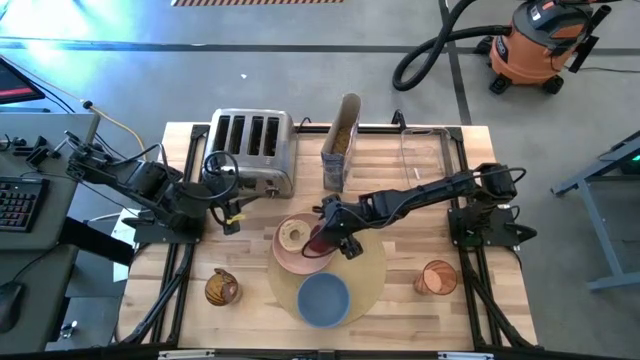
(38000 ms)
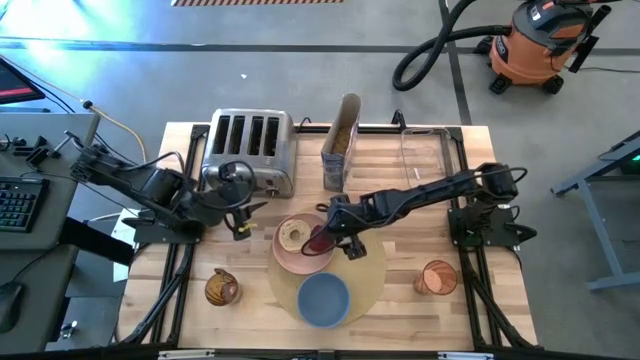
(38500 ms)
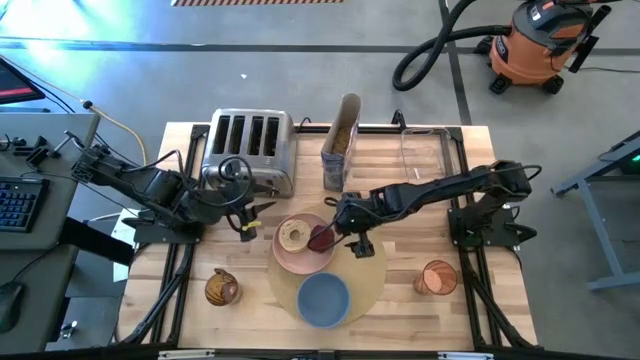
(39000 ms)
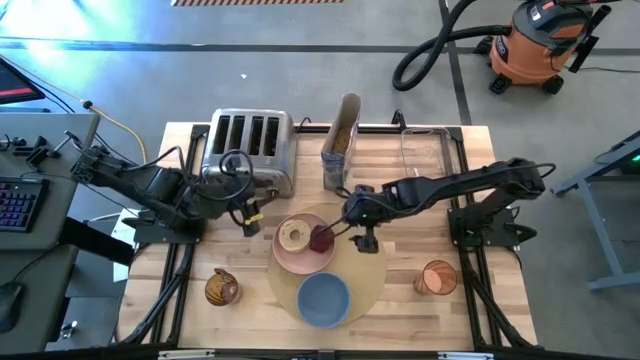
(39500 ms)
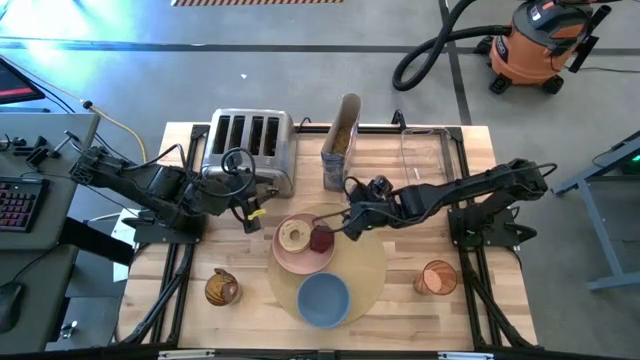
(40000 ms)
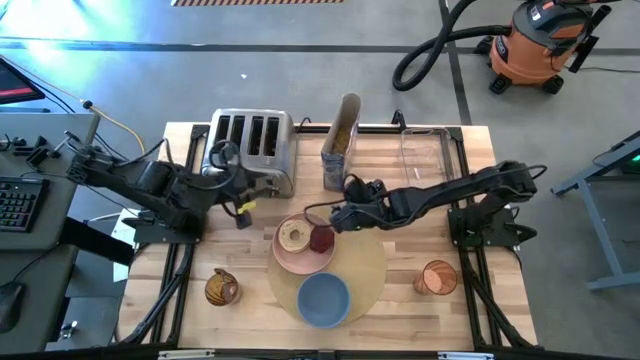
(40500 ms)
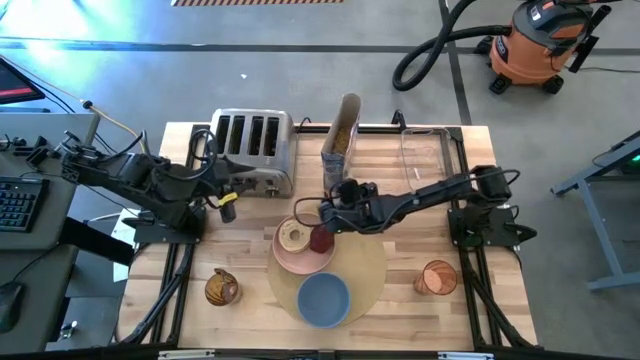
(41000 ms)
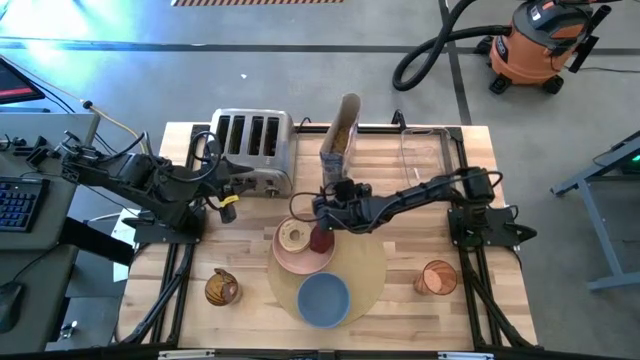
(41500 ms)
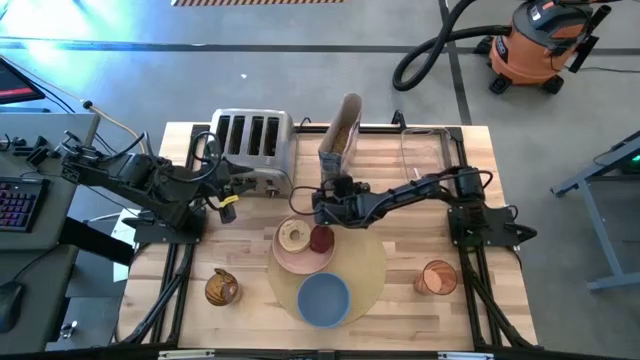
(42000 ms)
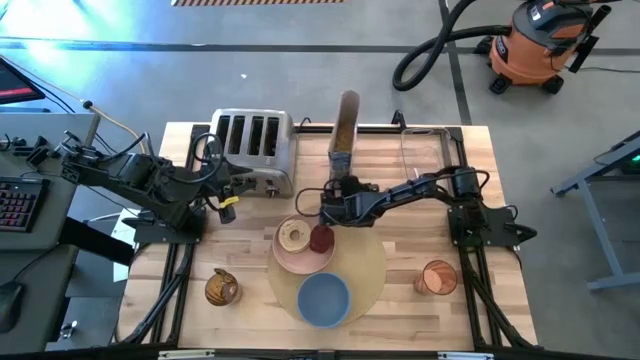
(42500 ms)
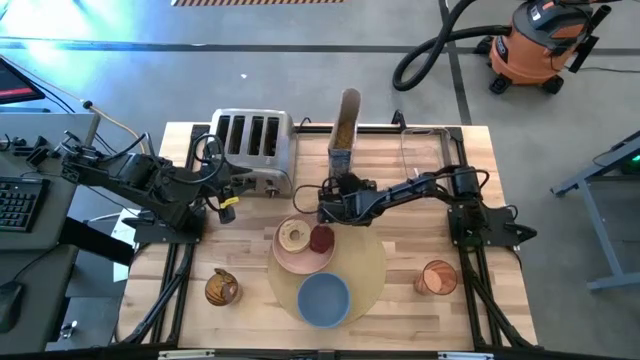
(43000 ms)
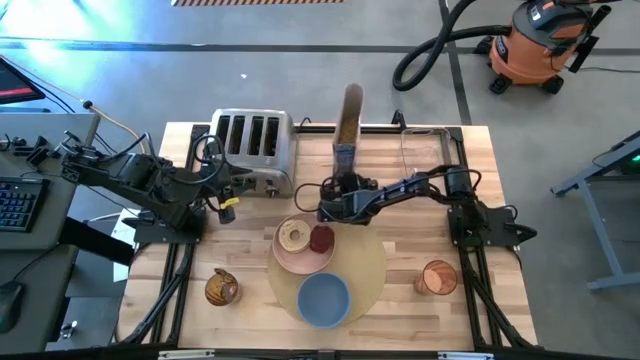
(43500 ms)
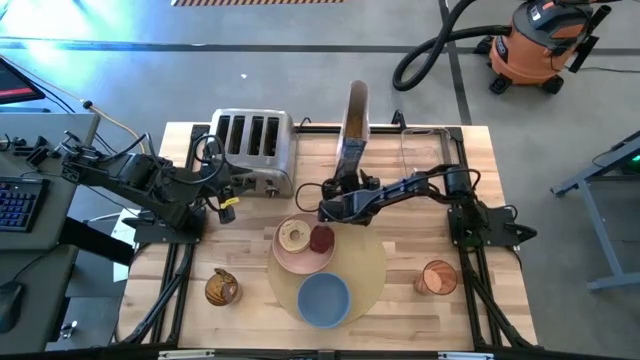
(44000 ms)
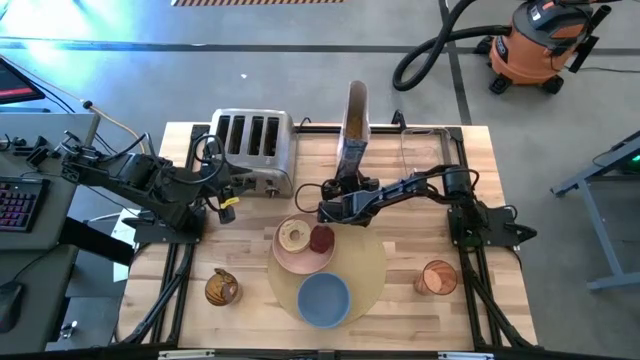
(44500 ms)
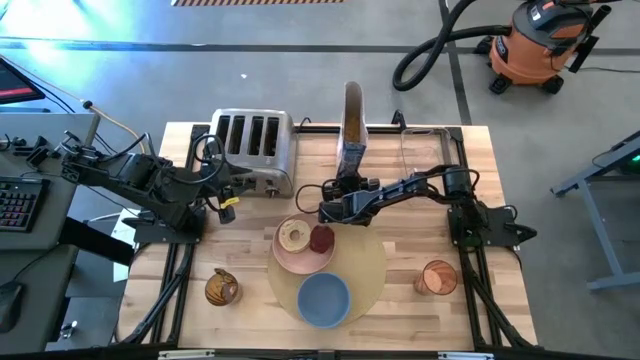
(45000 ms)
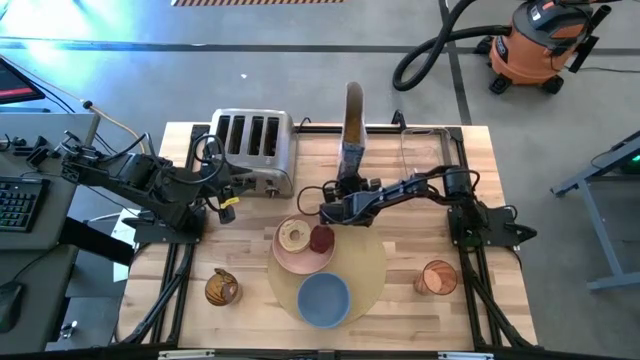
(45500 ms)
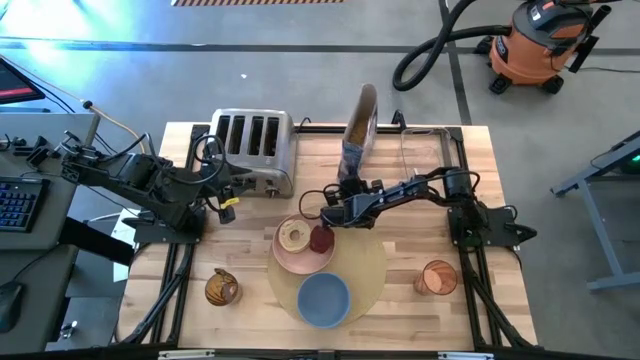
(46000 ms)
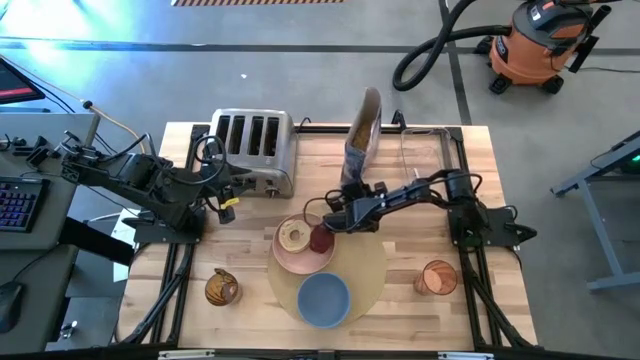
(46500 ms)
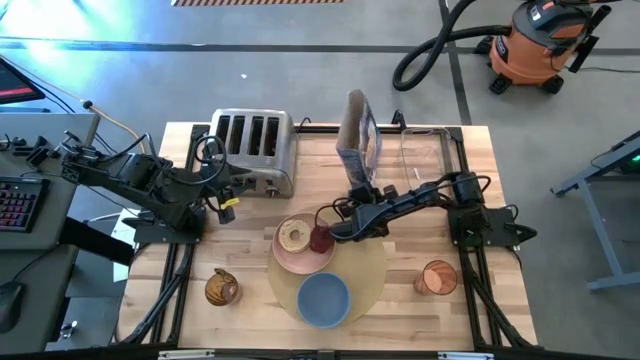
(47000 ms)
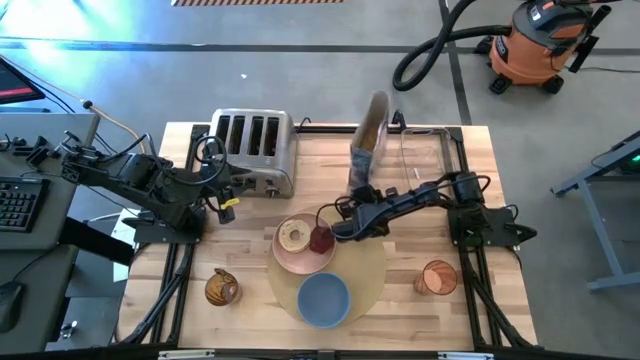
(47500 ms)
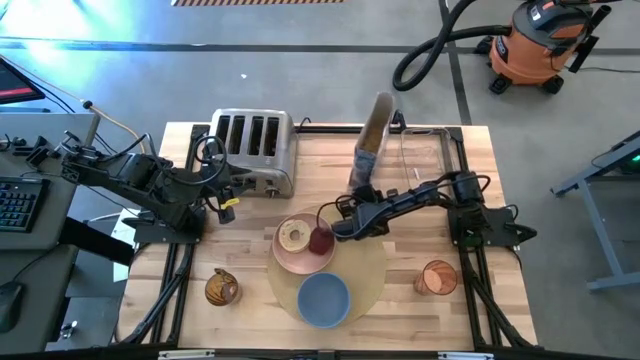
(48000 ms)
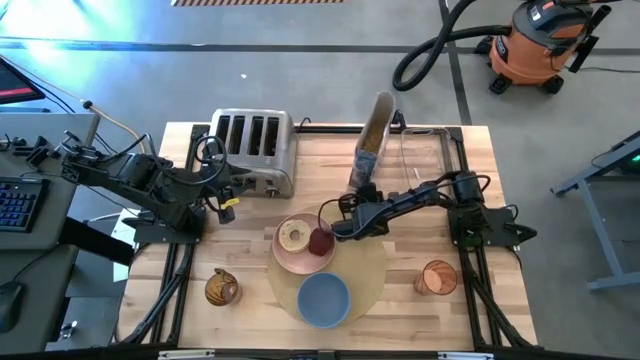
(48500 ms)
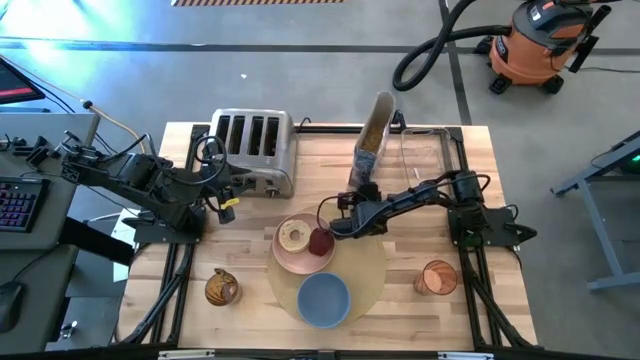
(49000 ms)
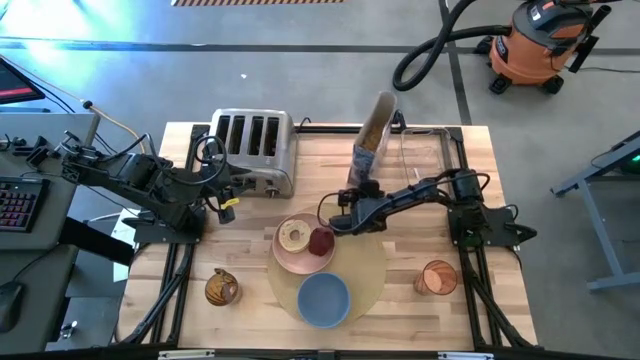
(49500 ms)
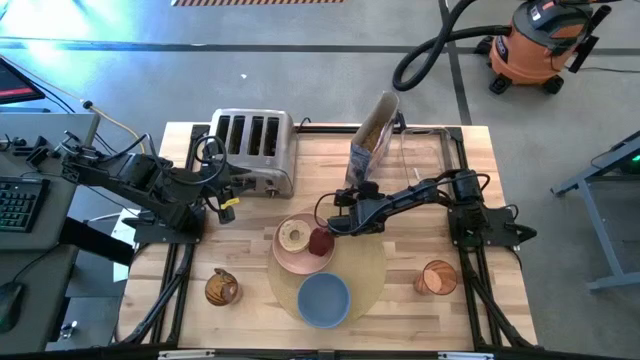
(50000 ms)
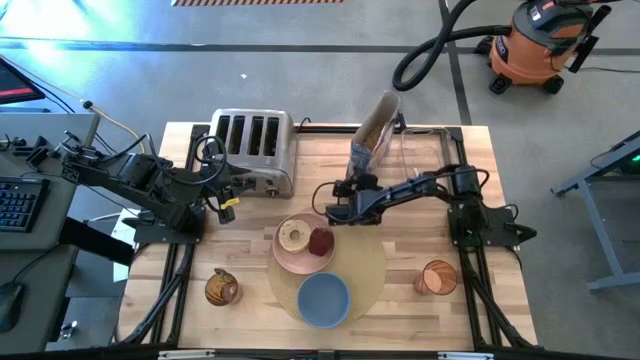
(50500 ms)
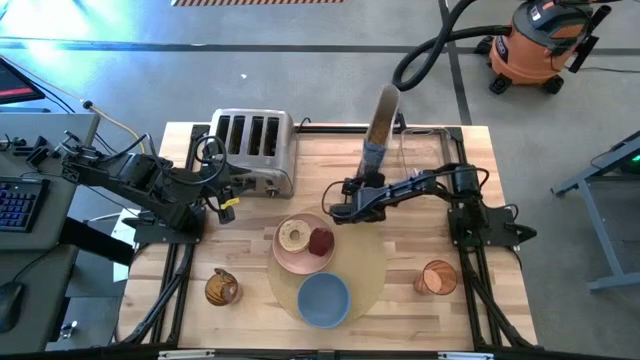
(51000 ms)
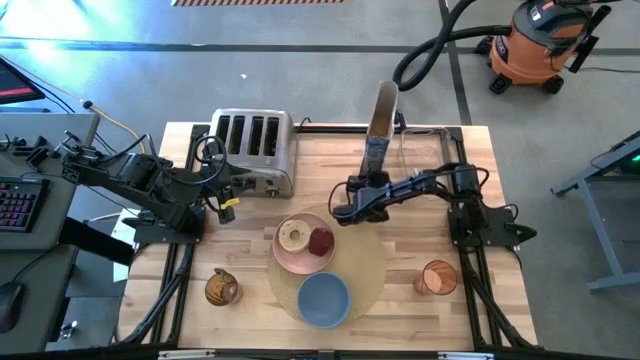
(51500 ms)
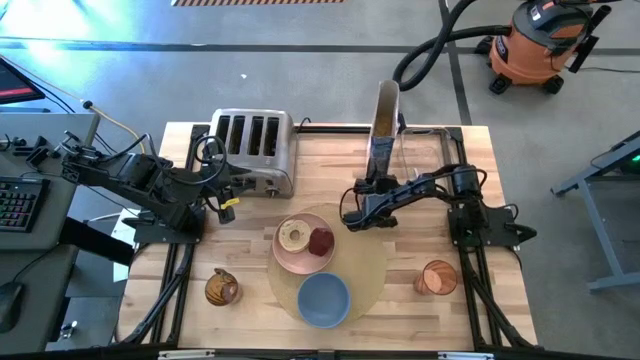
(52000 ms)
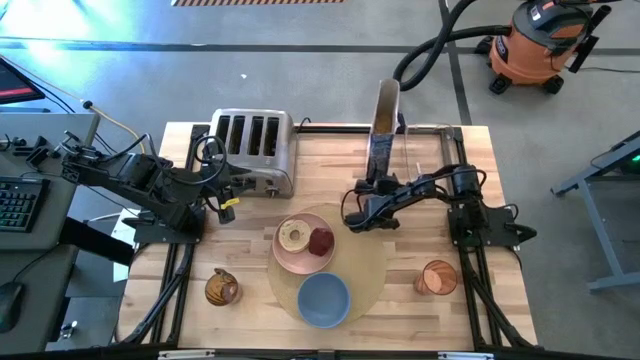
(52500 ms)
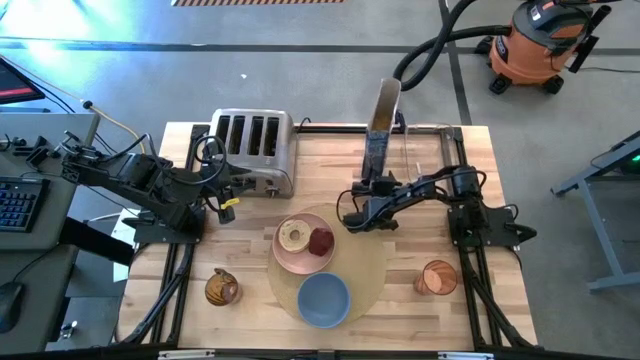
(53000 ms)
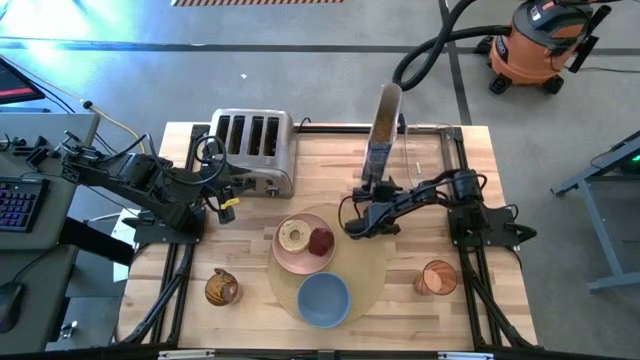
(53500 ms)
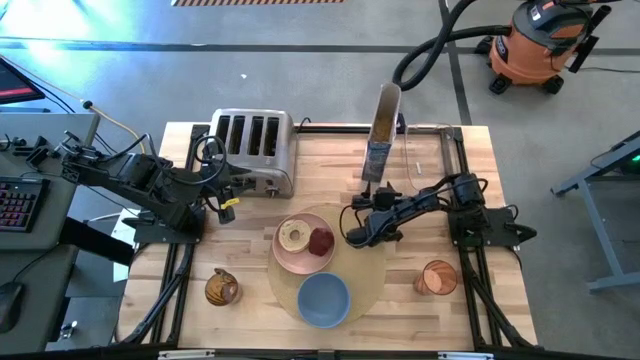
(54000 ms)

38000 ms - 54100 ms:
Task: Arrange a breakfast setting
Pour the cereal into the blue bowl

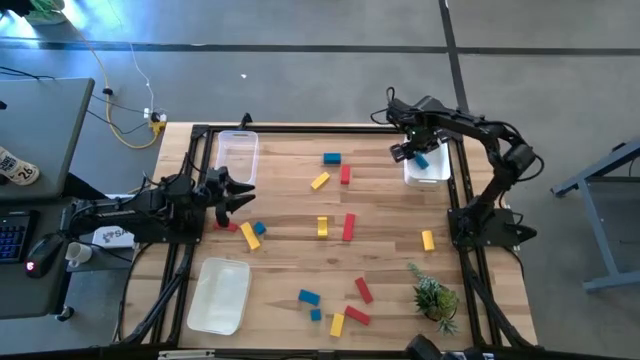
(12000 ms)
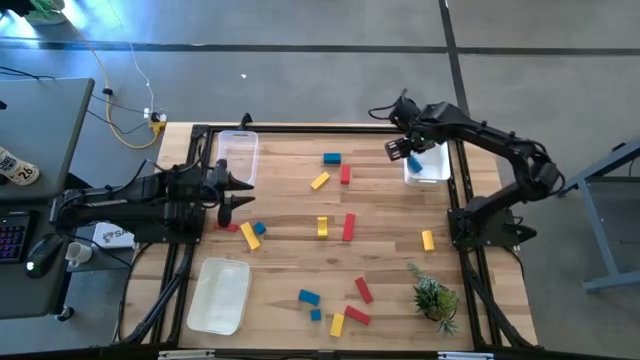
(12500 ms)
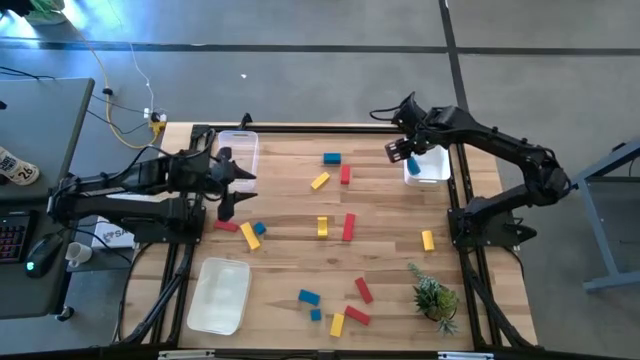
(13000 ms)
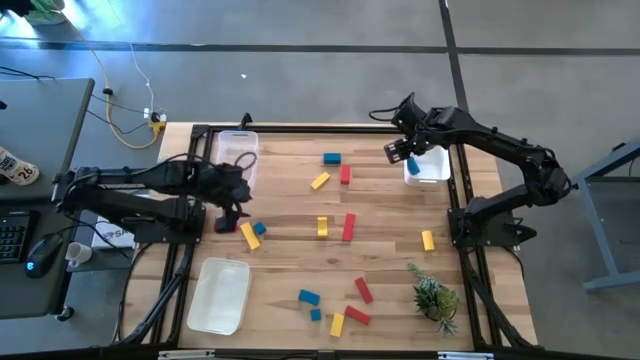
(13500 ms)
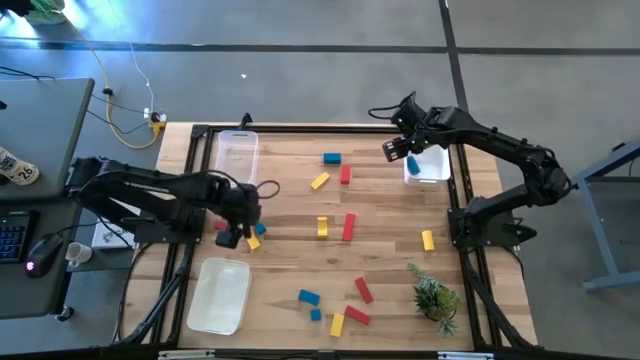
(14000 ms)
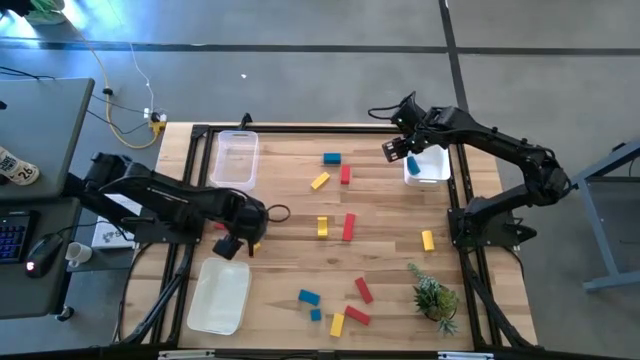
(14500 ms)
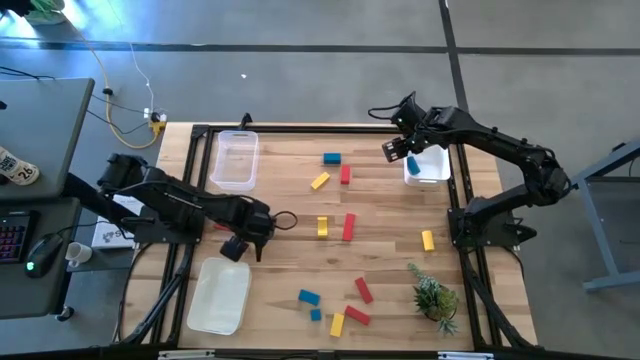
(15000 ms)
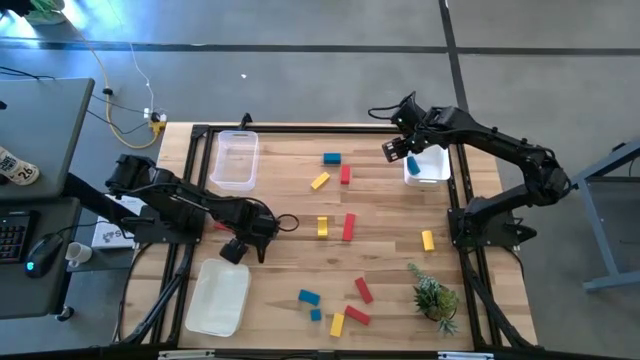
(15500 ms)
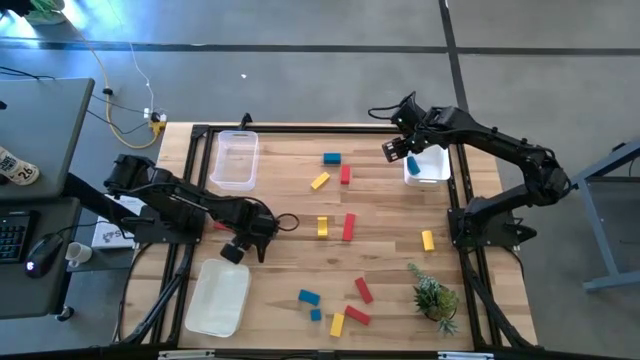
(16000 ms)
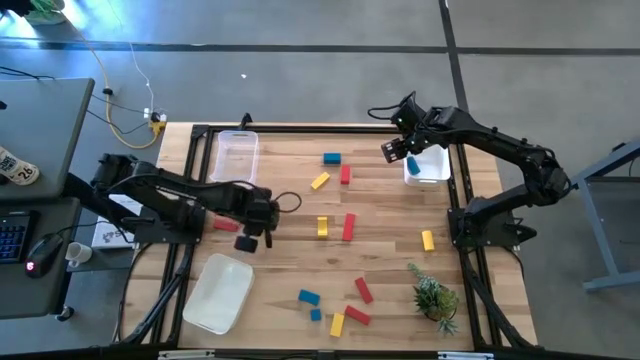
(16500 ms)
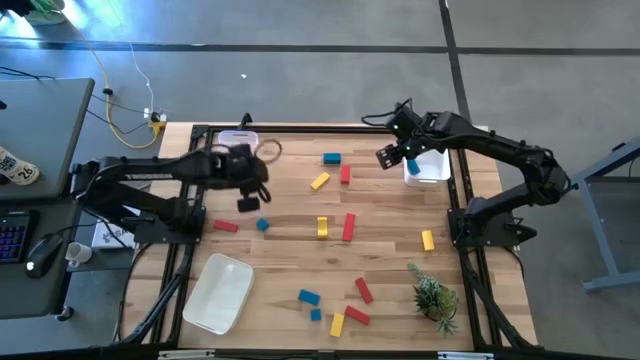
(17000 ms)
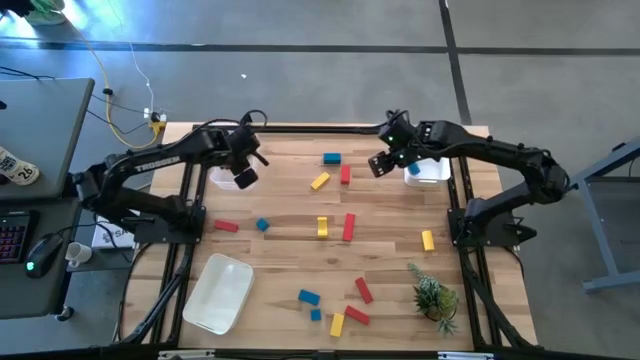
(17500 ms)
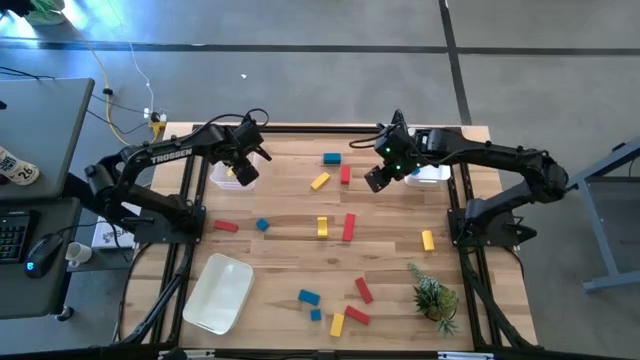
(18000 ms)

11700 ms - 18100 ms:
Task: Sort & place blocks by color
Put the yellow block into the transparent bin
